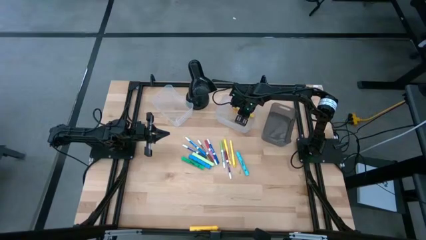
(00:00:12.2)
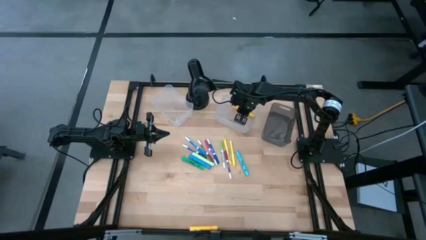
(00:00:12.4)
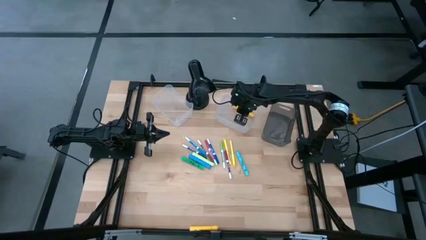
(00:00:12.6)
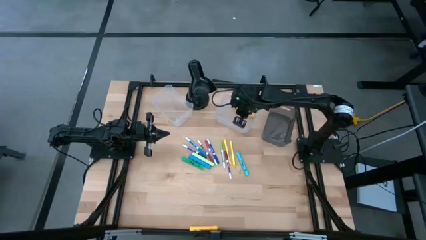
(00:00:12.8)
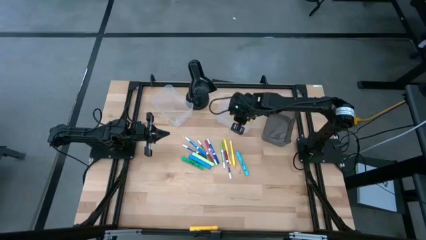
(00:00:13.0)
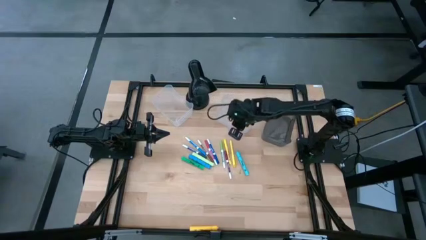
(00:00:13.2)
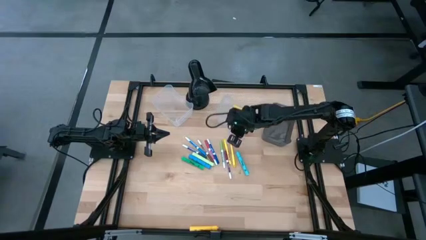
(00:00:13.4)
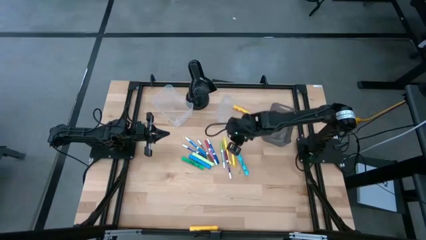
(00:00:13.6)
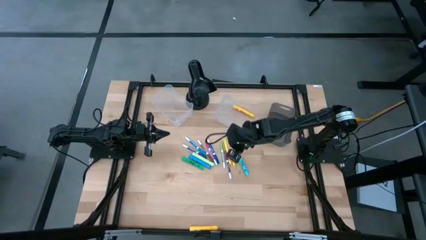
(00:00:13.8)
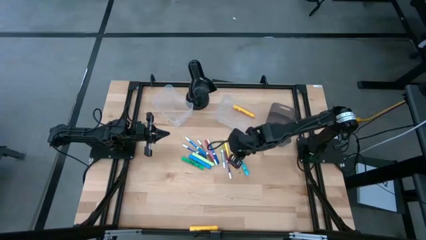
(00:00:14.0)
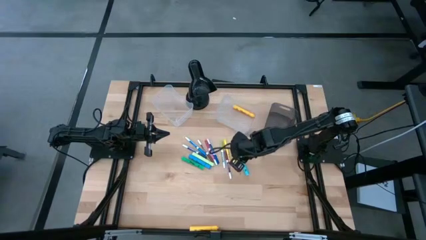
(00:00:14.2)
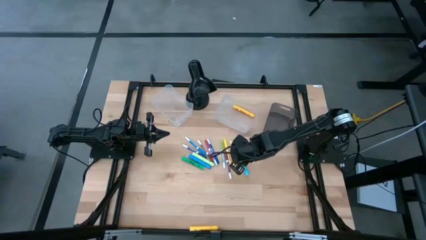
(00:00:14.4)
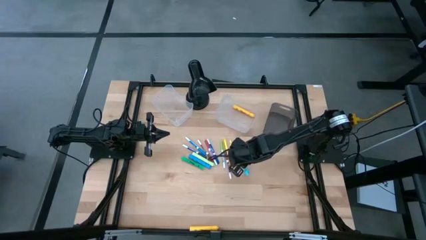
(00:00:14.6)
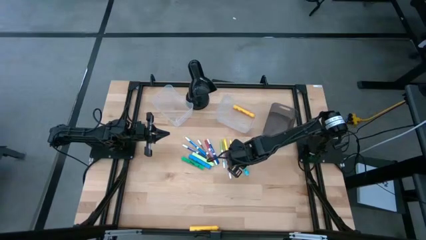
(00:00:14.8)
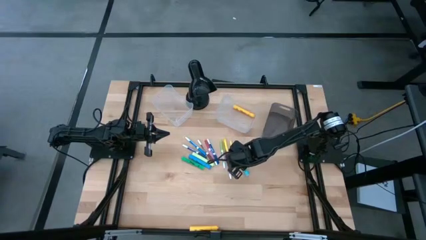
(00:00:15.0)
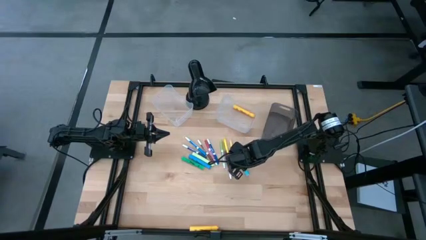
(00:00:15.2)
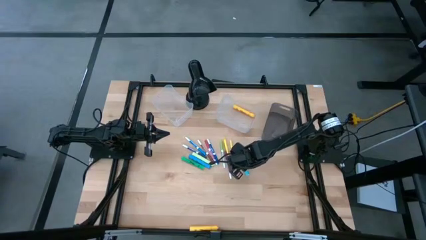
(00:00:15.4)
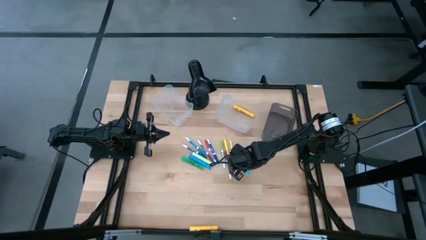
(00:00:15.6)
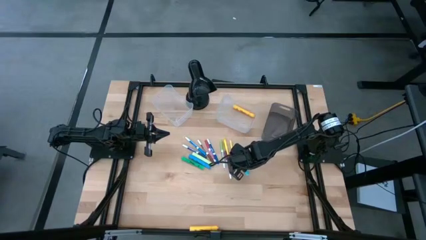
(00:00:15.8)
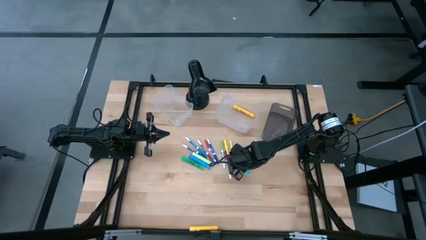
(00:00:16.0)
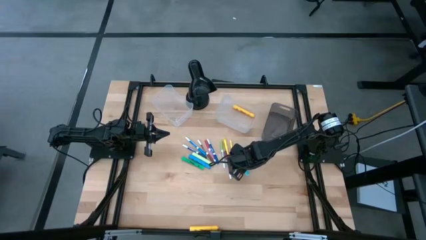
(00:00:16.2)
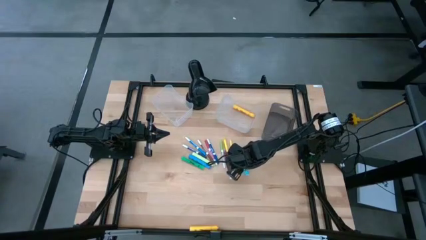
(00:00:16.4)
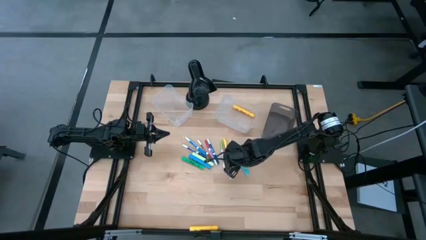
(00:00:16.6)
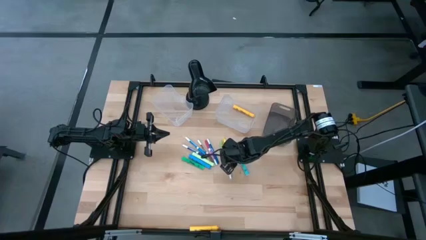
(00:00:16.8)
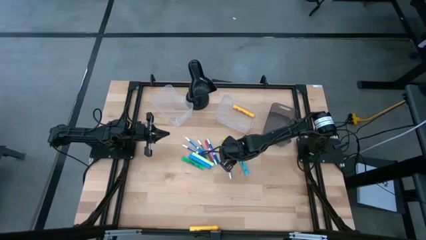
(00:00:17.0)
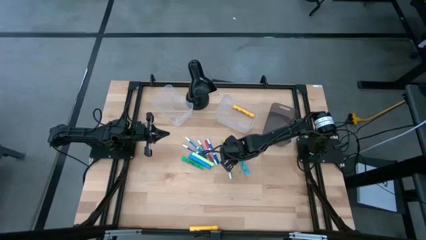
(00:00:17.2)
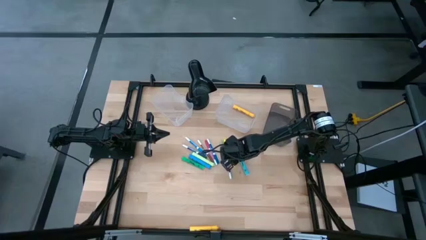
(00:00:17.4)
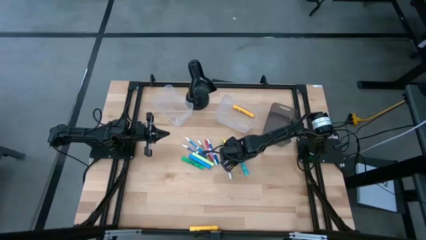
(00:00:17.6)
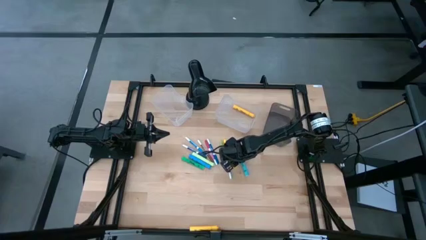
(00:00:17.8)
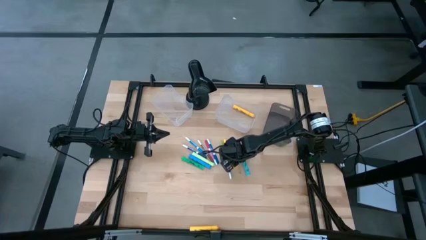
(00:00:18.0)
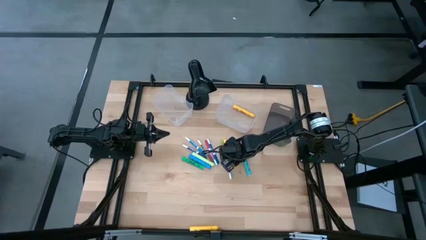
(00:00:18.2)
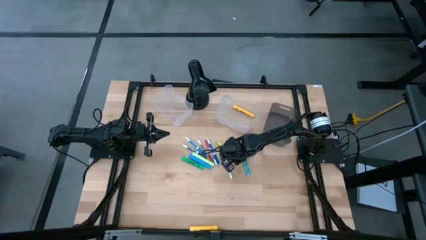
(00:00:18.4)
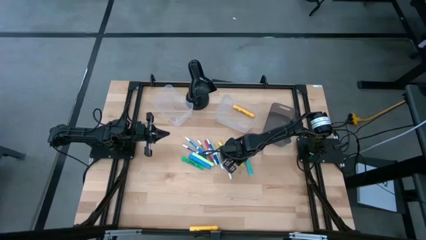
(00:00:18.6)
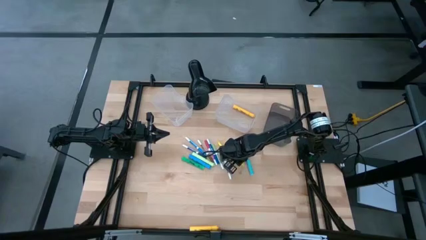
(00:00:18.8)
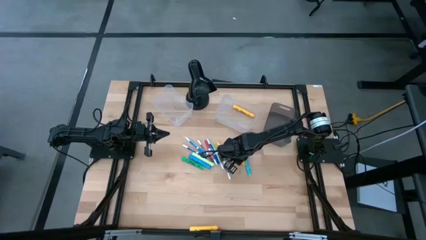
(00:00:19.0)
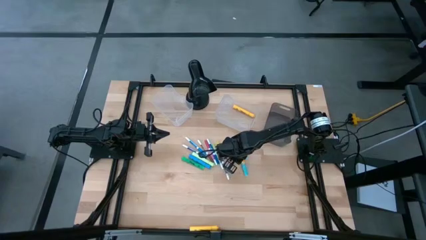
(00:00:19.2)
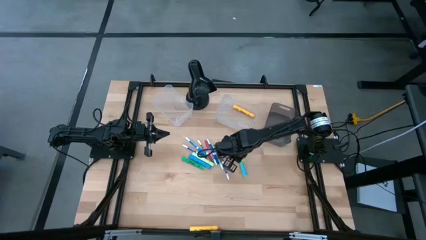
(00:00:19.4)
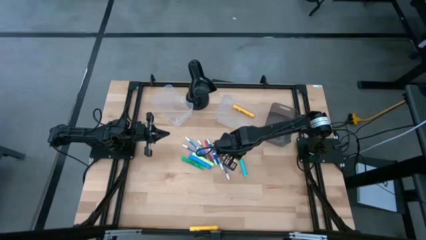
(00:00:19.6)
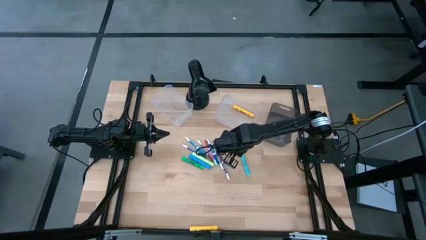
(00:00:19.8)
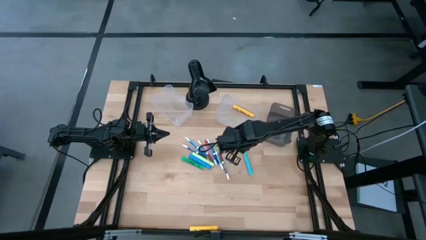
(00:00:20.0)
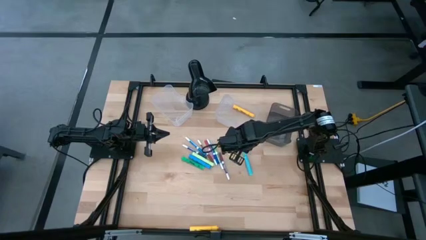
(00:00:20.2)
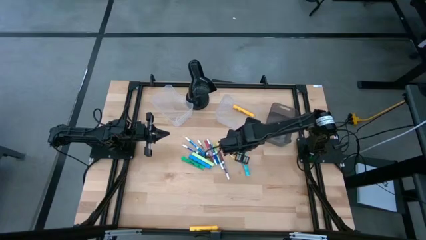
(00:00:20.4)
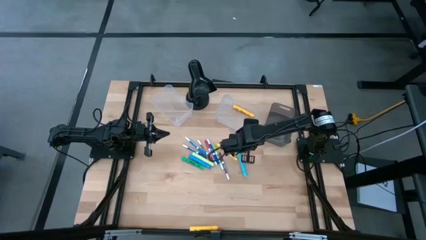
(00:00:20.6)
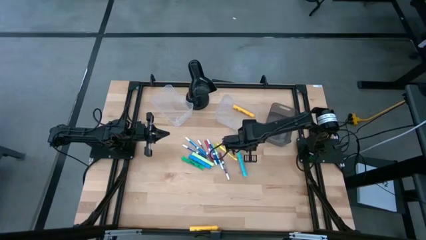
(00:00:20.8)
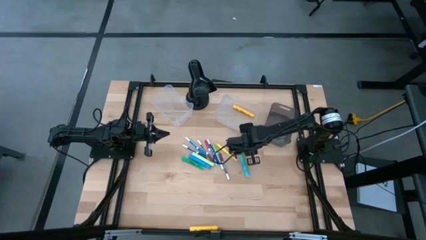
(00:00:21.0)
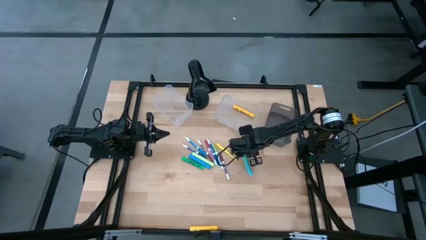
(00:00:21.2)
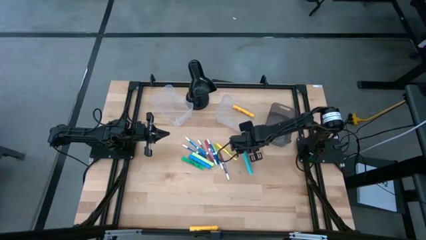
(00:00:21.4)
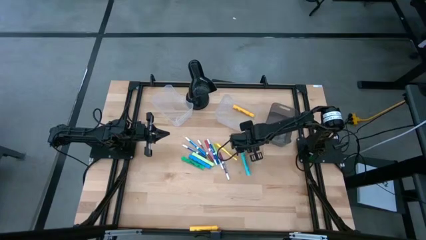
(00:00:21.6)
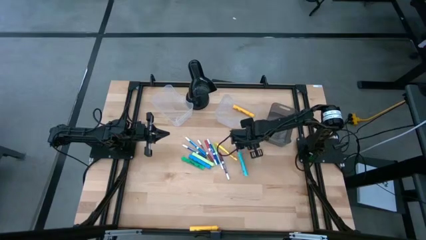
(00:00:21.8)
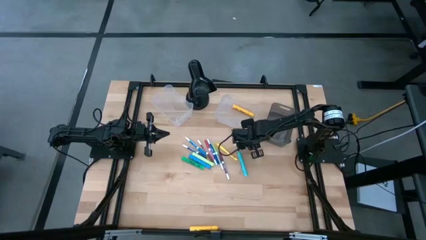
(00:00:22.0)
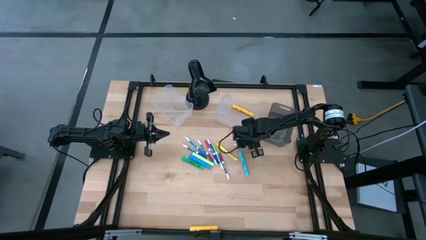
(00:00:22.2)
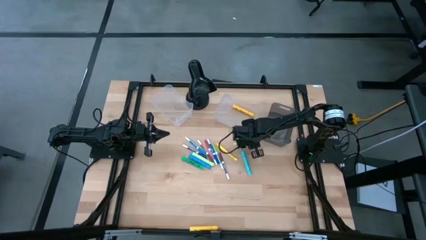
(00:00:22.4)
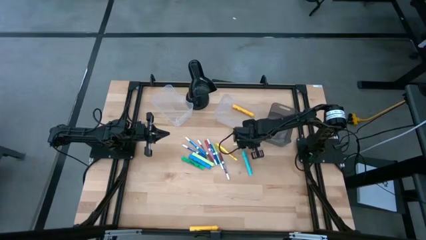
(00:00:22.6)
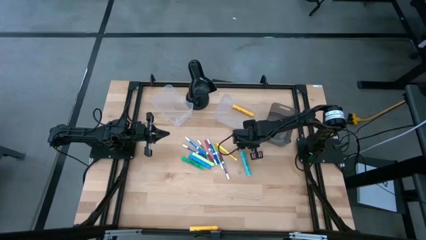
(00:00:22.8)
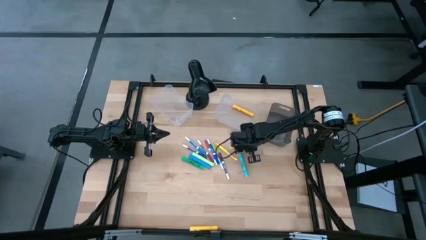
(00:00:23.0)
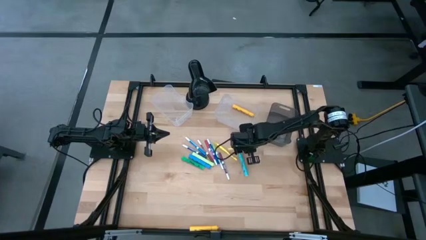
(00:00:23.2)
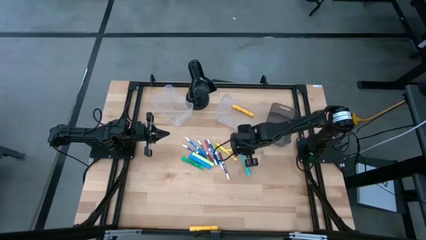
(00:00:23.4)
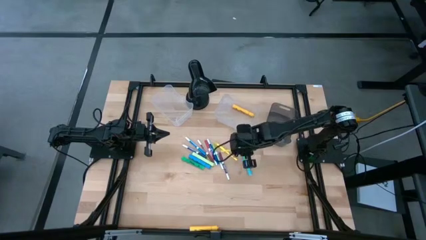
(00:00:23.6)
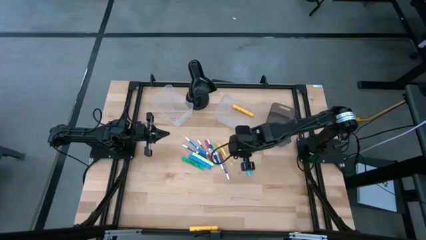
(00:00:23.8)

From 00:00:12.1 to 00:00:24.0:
Task: Pick & Place Markers
Put the right yellow pen in the gray bin
